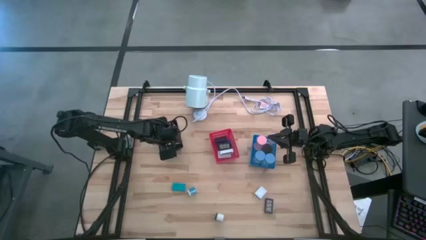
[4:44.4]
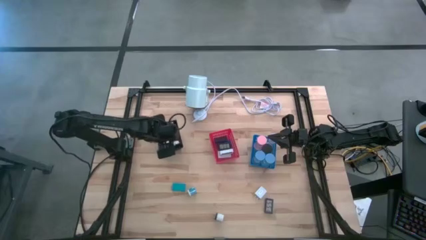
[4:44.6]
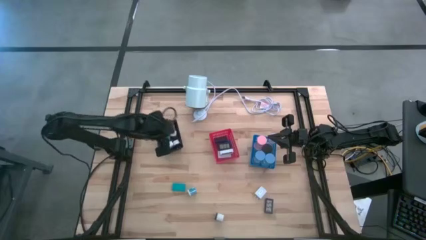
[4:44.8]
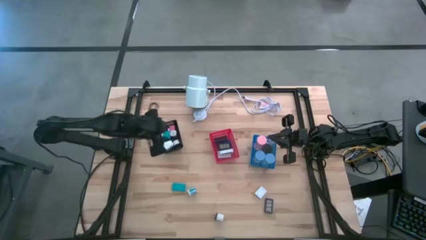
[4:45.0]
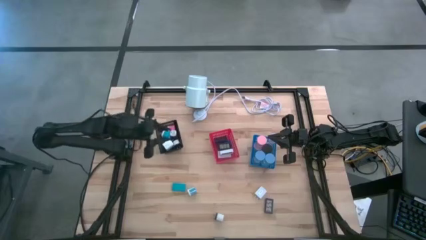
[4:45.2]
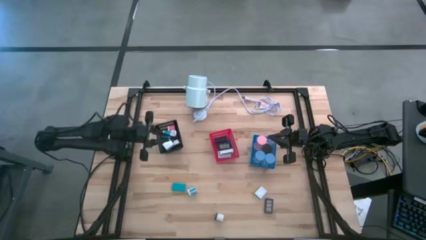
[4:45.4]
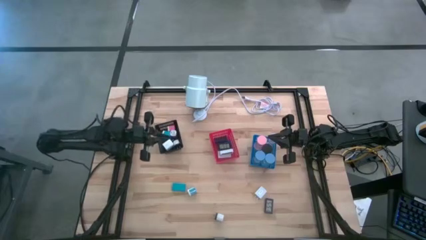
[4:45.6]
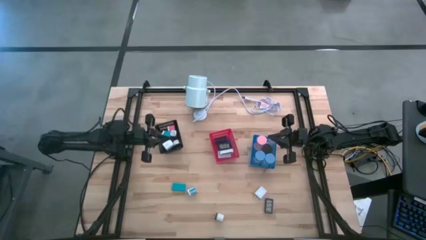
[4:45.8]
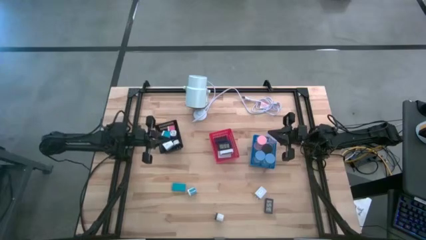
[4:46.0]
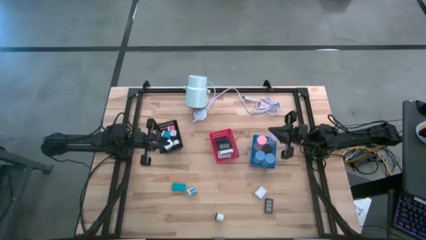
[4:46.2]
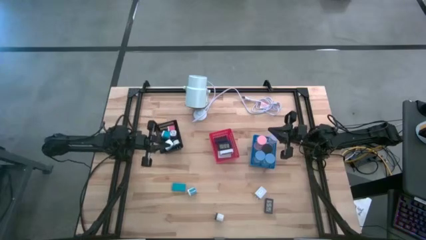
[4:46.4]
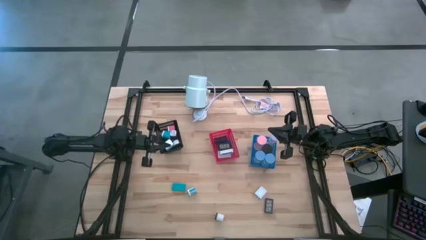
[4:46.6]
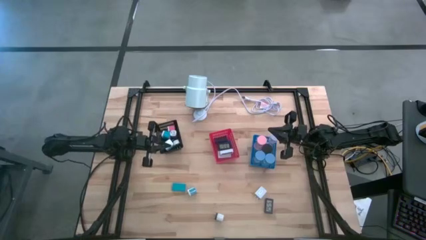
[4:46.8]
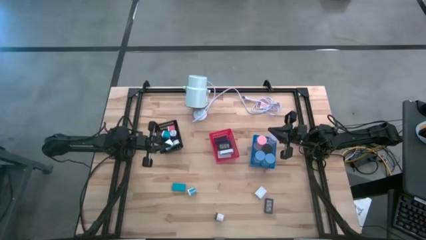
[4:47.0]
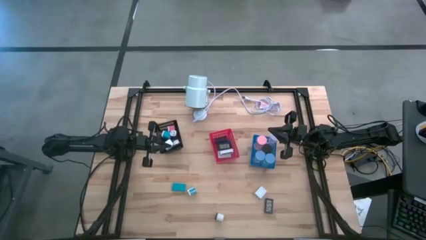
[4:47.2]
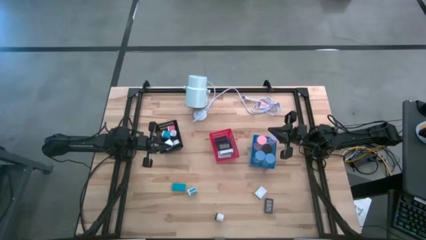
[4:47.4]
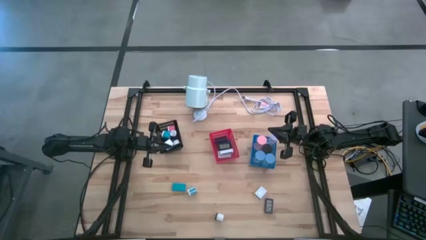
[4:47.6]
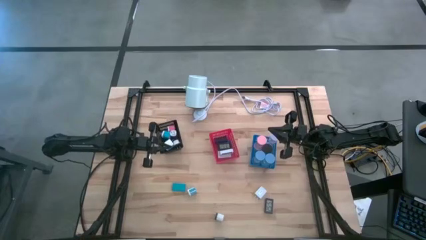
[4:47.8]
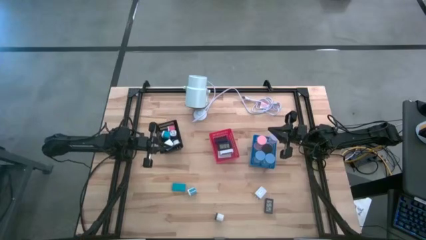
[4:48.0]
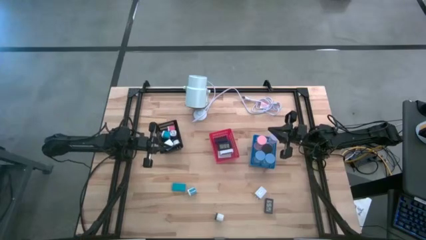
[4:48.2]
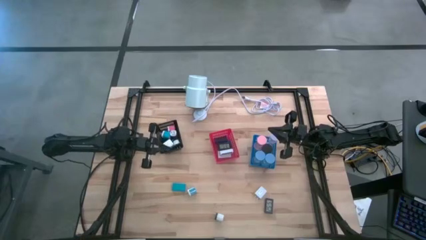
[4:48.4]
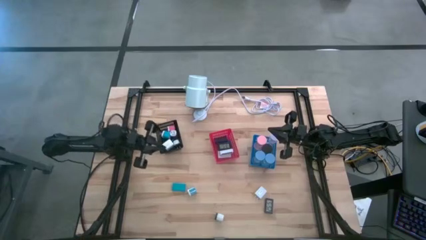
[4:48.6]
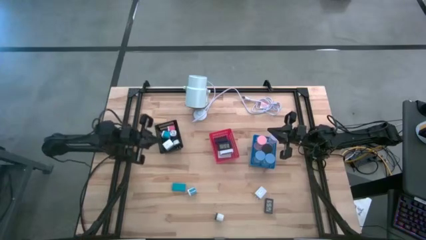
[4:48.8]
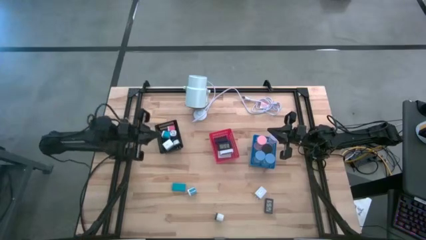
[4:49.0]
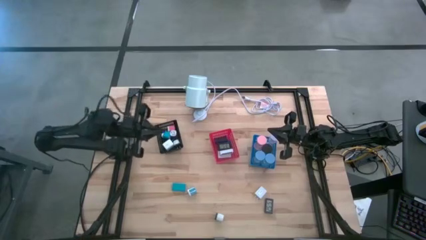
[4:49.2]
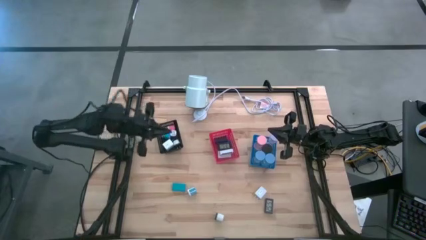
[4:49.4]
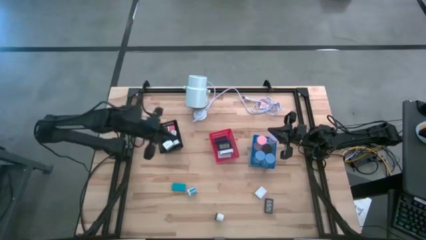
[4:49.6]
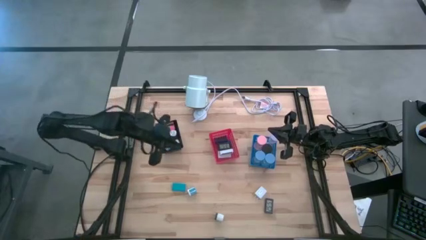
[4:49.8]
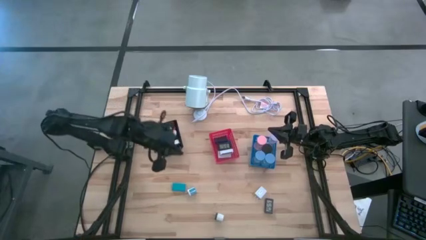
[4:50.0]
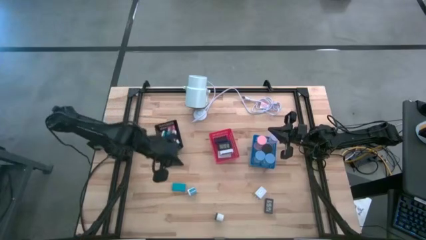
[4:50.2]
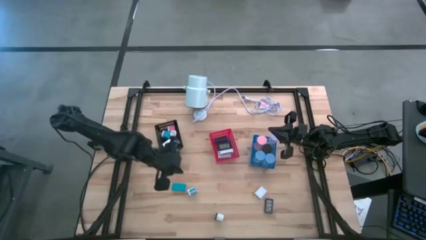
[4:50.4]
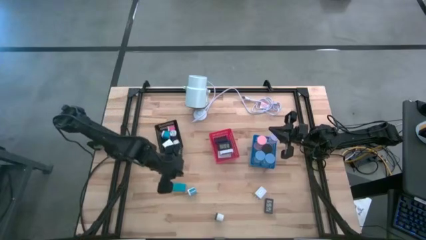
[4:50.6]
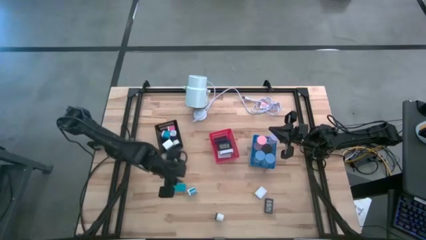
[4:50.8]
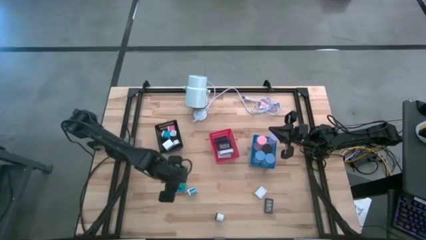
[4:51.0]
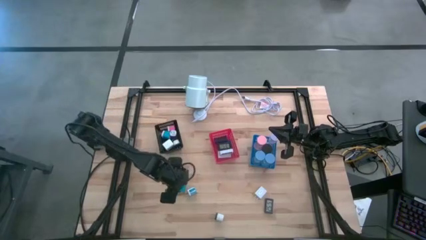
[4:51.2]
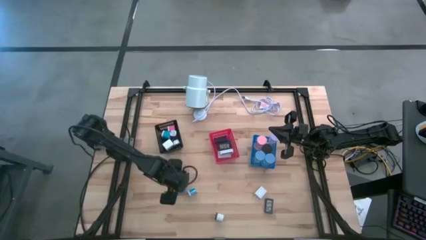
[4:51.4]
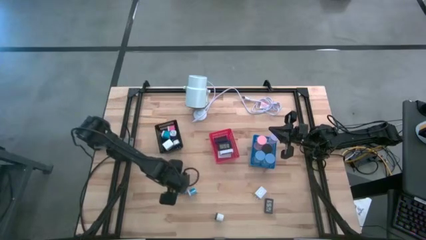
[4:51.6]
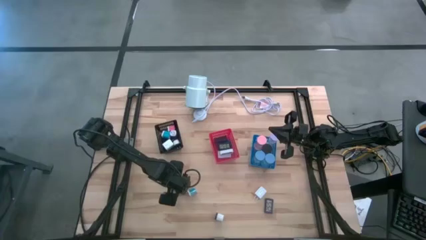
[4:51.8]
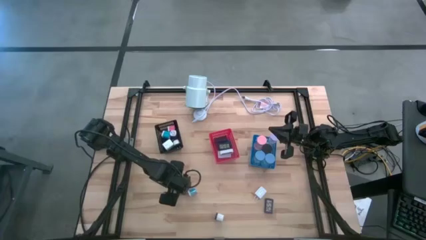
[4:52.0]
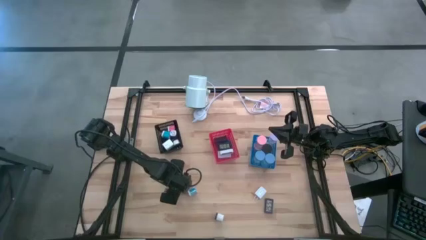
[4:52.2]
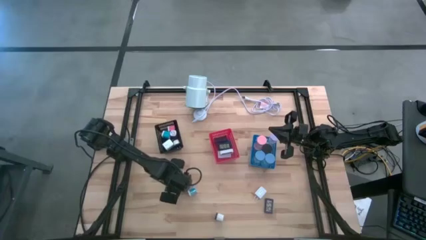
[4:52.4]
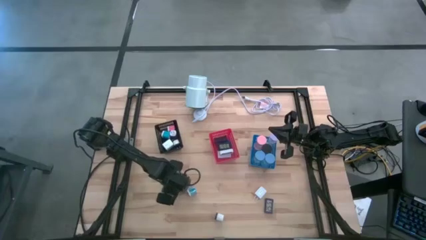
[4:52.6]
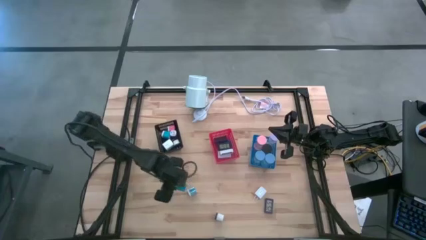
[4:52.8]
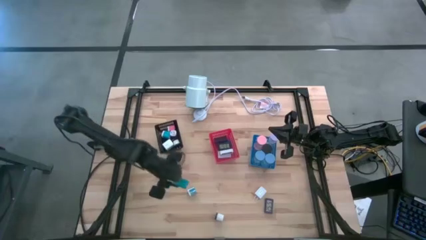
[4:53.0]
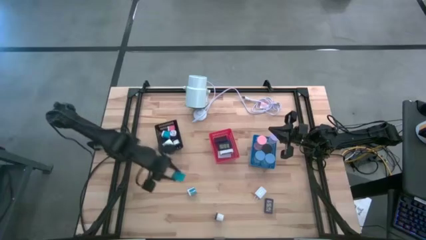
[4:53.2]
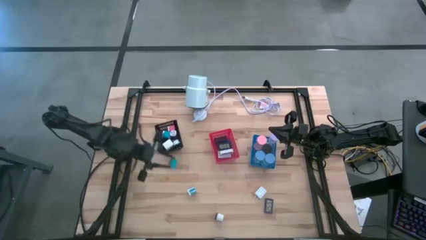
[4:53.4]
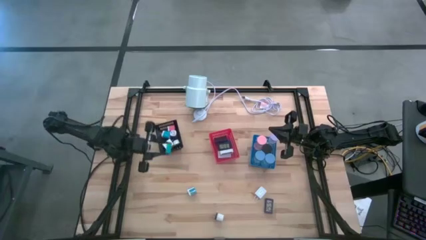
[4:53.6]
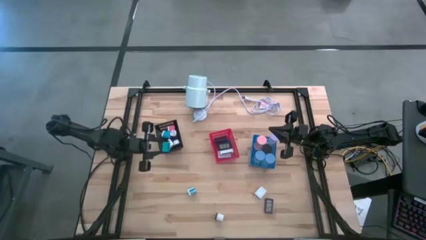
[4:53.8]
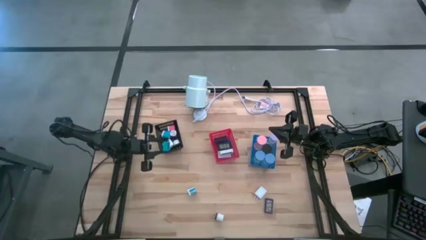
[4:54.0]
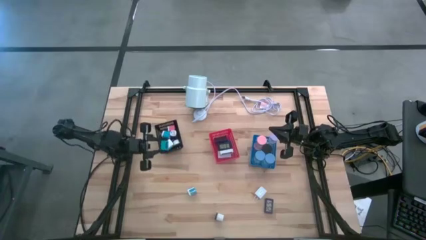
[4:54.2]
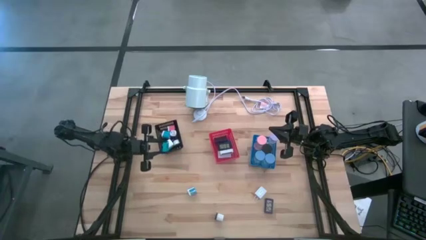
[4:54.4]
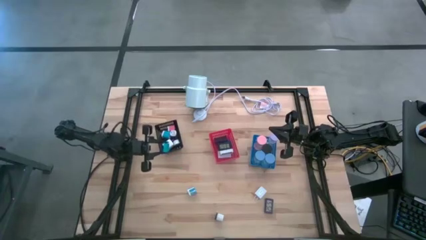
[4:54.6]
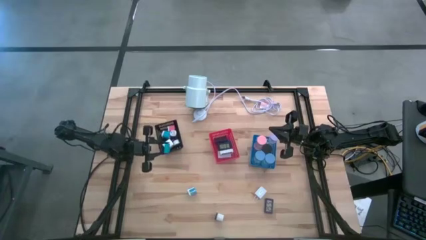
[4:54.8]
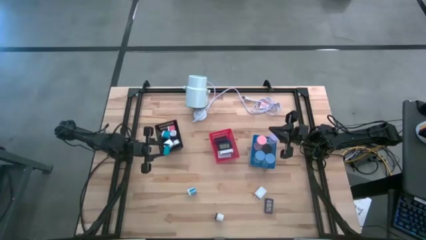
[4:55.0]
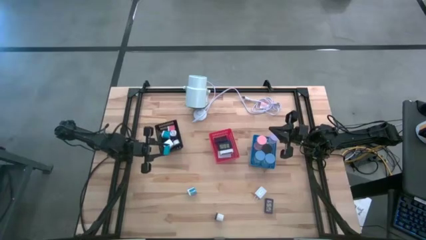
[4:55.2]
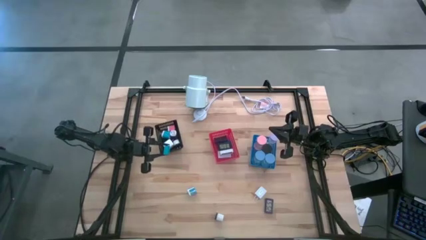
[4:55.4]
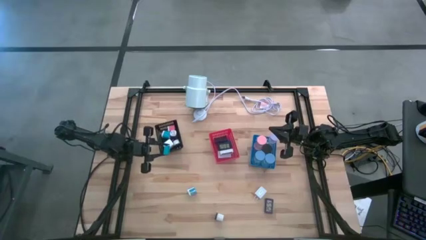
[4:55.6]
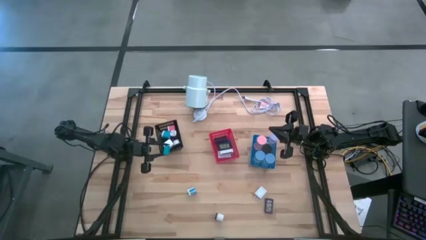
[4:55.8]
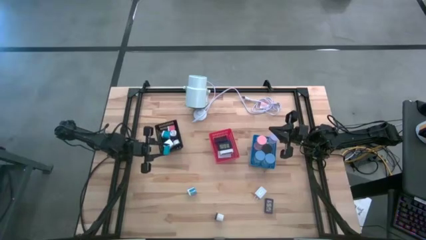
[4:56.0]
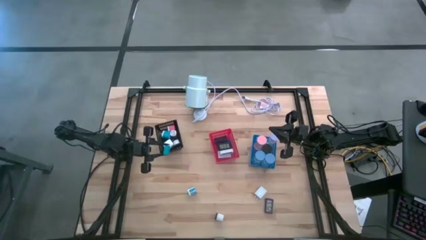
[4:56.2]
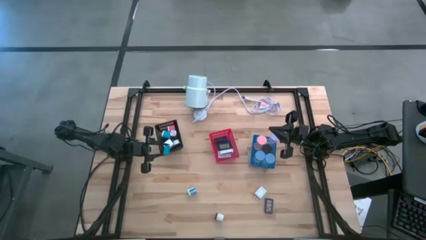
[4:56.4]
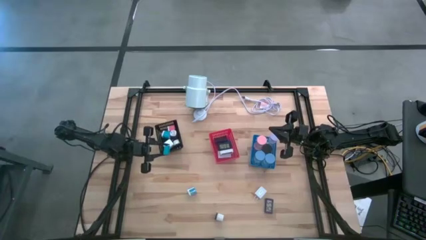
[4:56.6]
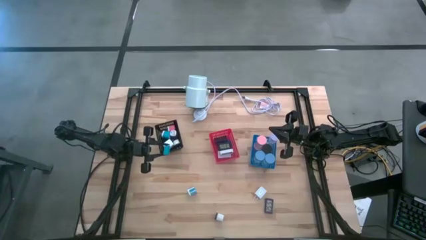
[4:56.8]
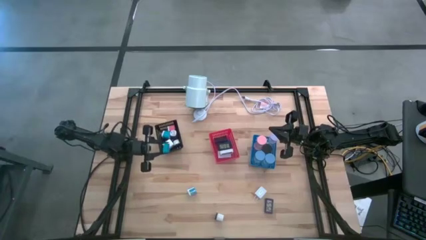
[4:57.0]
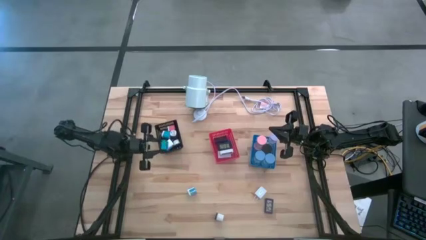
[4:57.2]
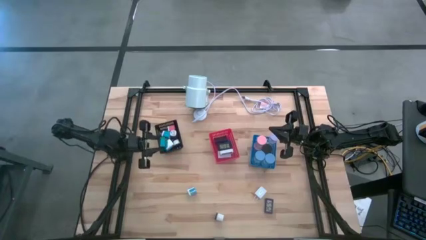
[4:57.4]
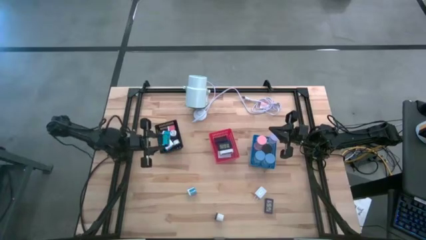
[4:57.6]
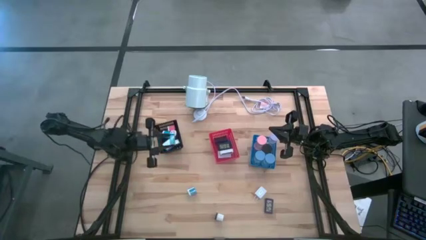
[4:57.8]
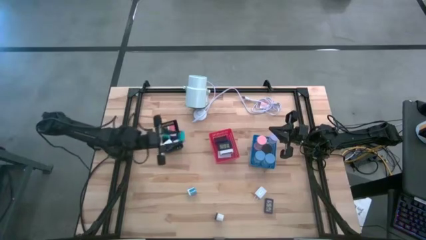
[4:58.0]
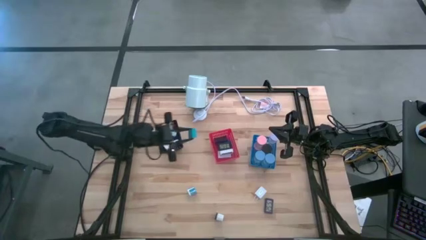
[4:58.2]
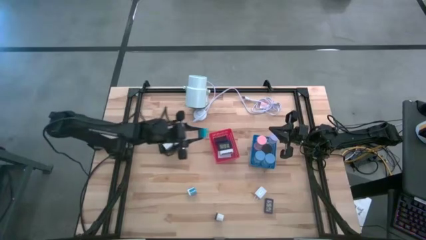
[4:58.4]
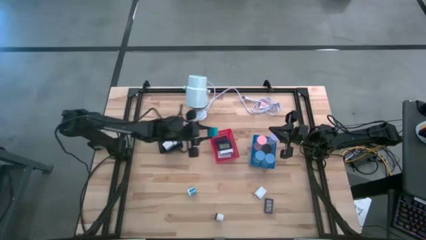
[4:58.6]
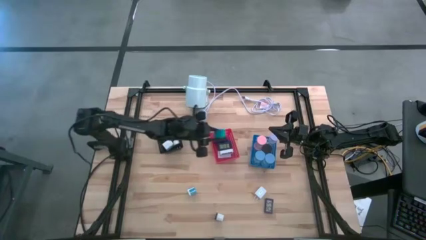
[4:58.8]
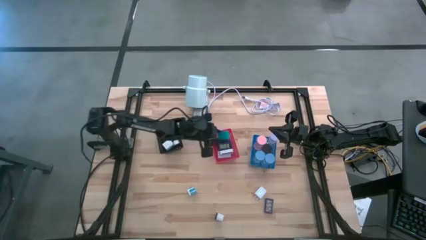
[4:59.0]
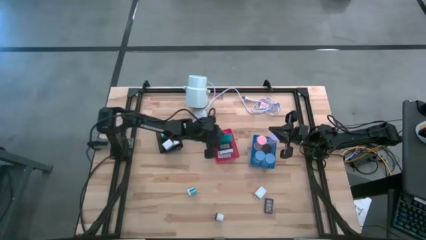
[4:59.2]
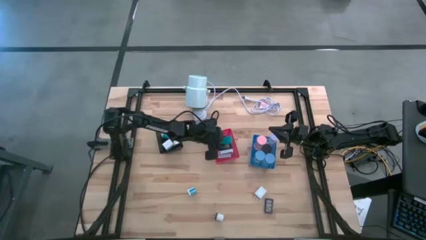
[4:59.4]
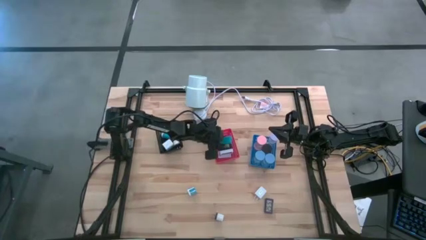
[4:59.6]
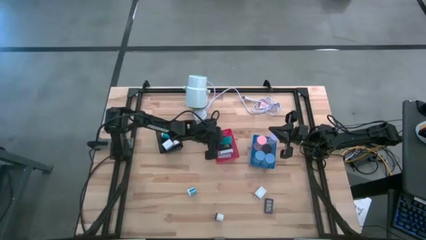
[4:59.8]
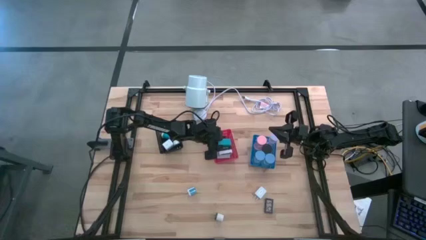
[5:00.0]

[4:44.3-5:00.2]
Task: Pick & Place Office items
Put the light blue digital clock into the red bin

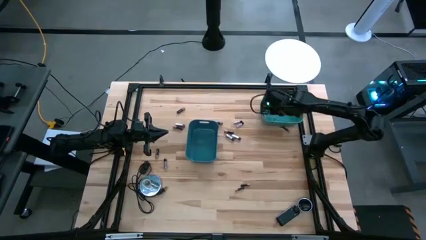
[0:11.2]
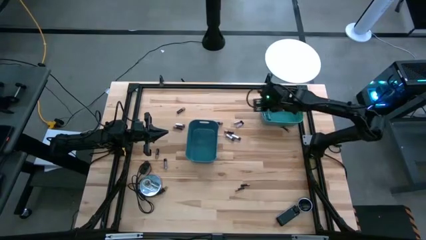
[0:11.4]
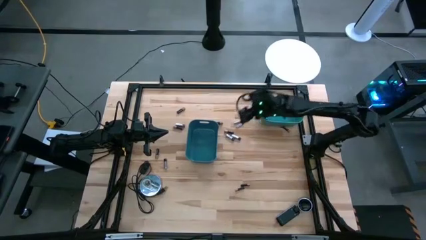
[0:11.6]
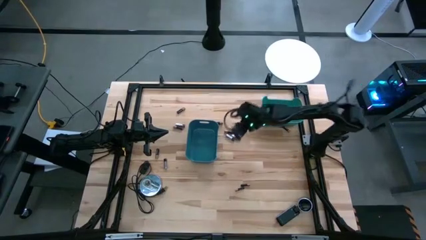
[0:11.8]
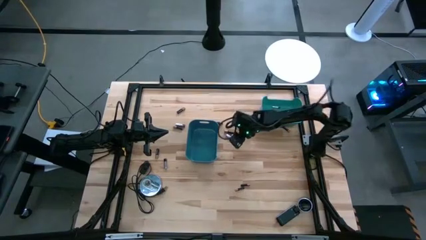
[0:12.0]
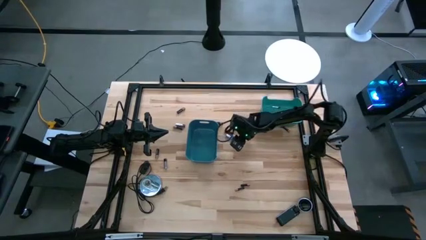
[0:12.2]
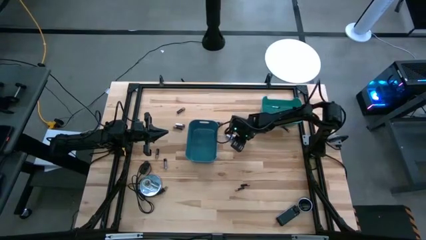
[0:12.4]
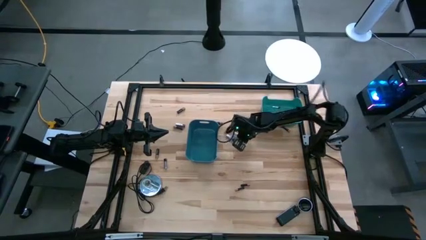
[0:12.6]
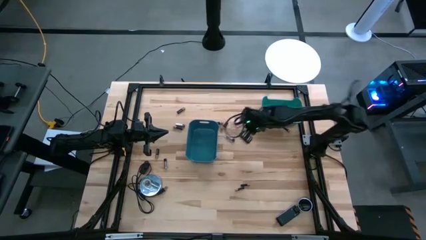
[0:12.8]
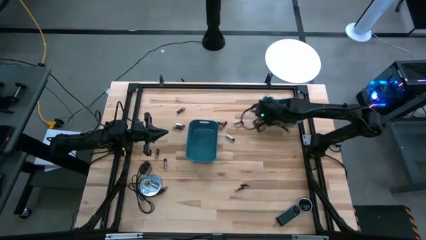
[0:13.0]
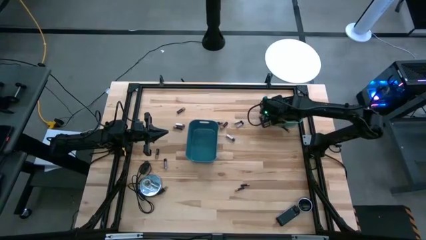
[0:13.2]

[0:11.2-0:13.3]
Task: Sort batteries
Put the silver battery into the green bin
